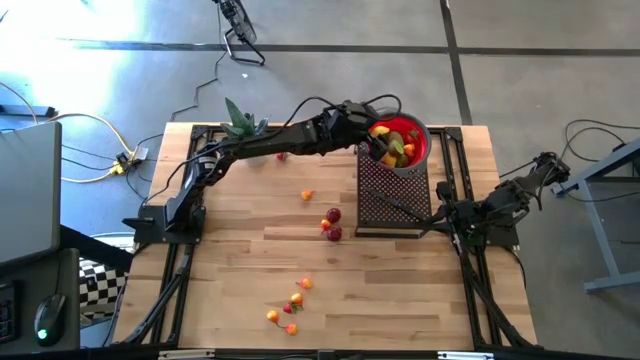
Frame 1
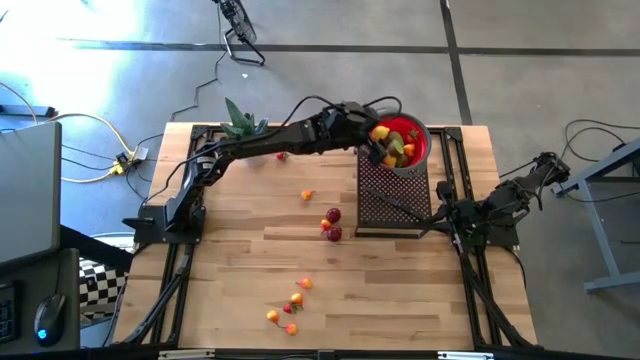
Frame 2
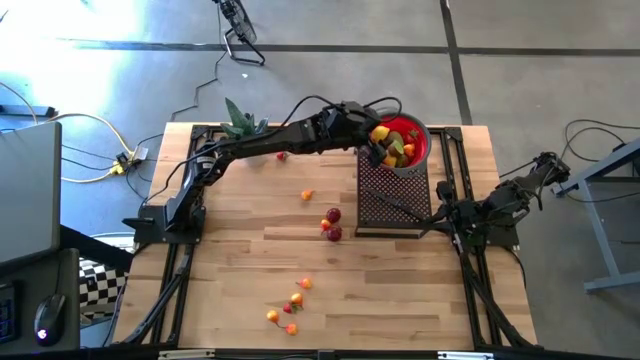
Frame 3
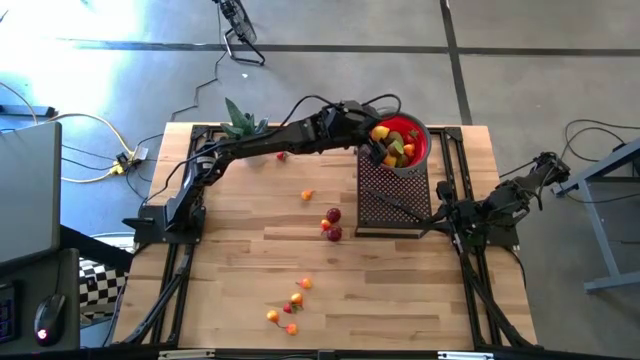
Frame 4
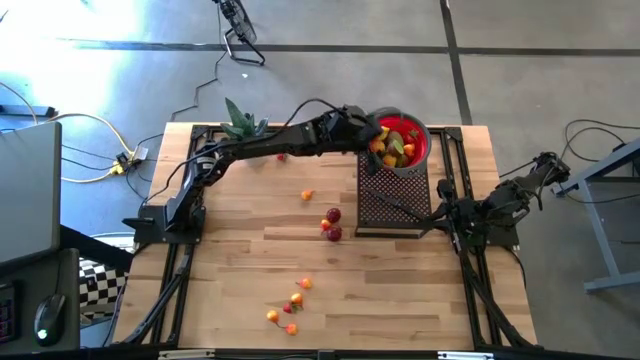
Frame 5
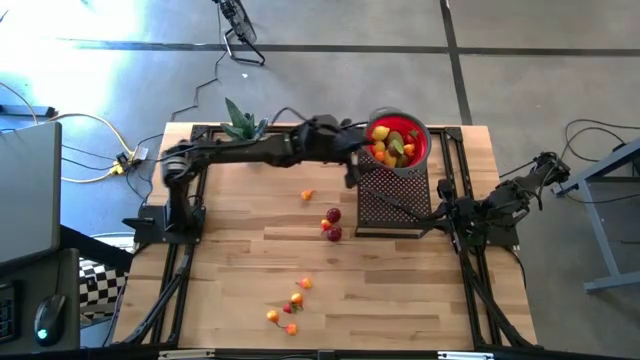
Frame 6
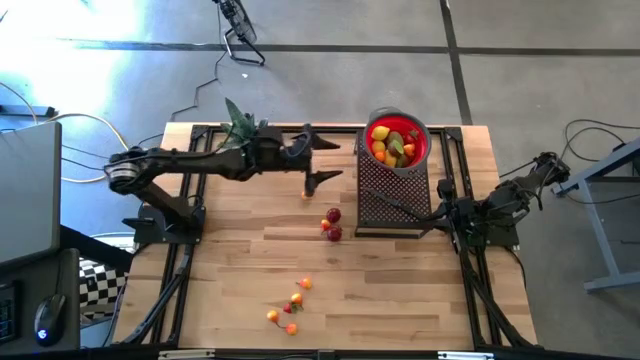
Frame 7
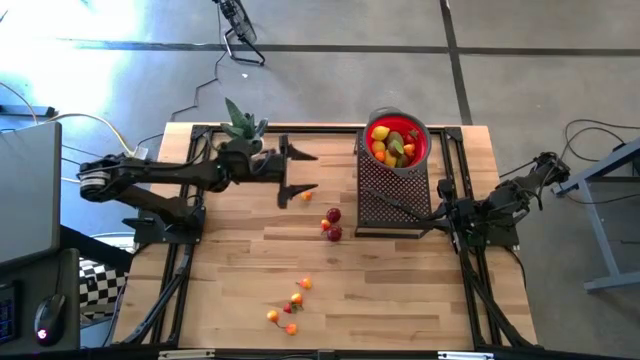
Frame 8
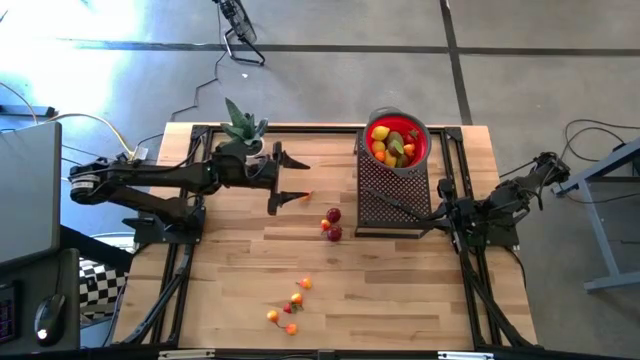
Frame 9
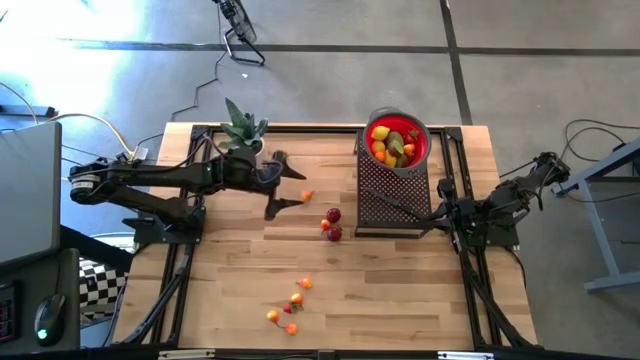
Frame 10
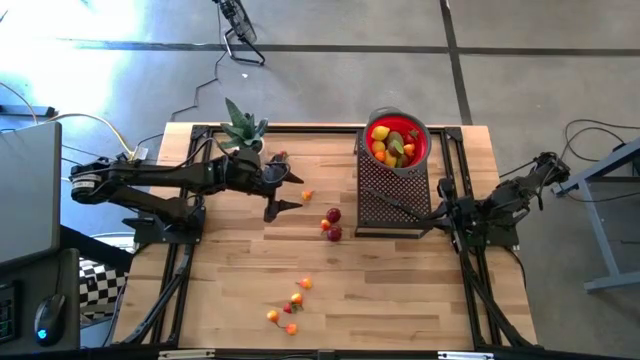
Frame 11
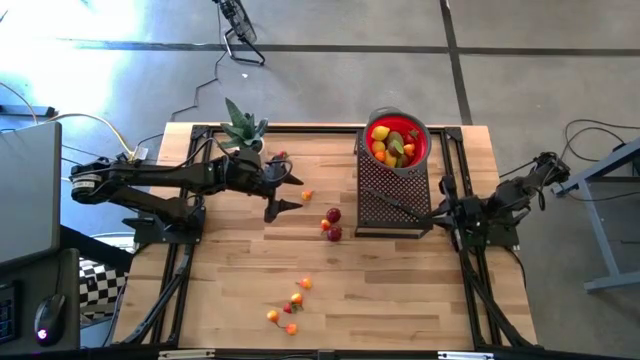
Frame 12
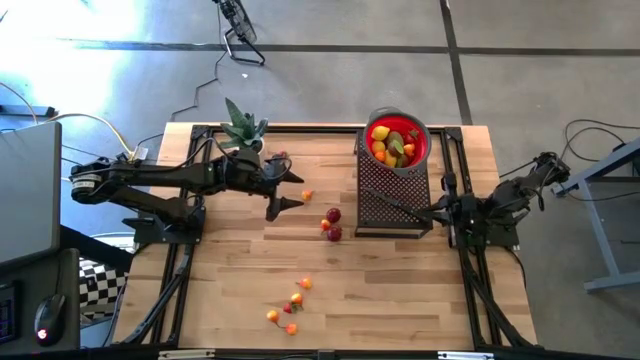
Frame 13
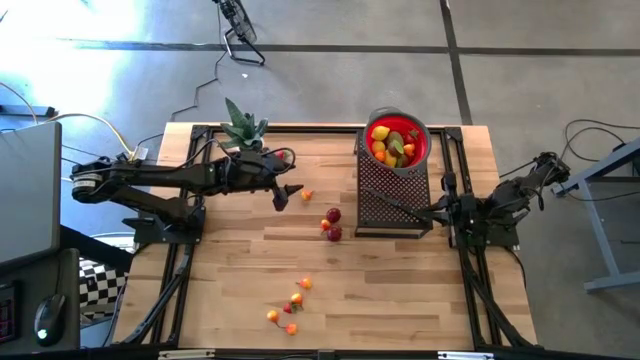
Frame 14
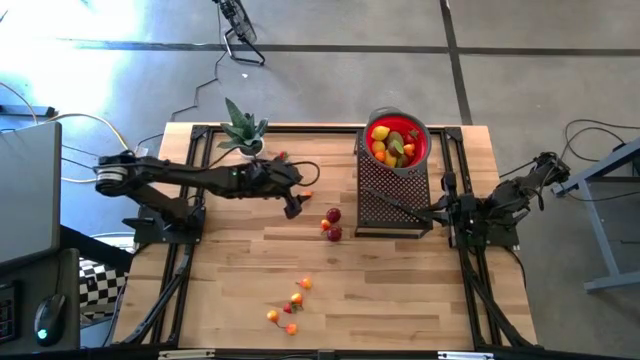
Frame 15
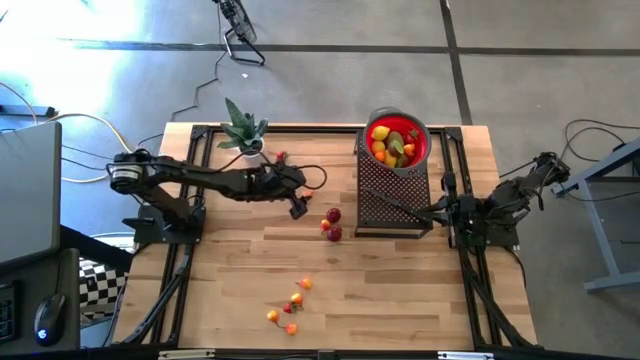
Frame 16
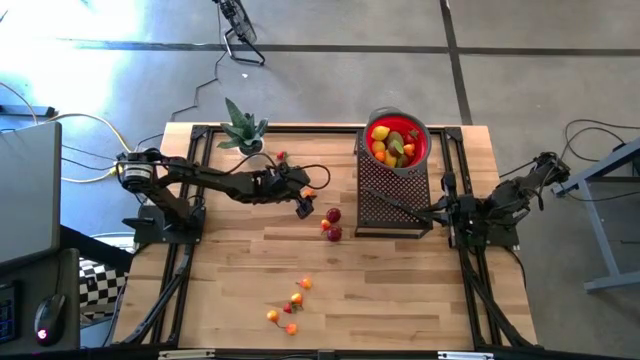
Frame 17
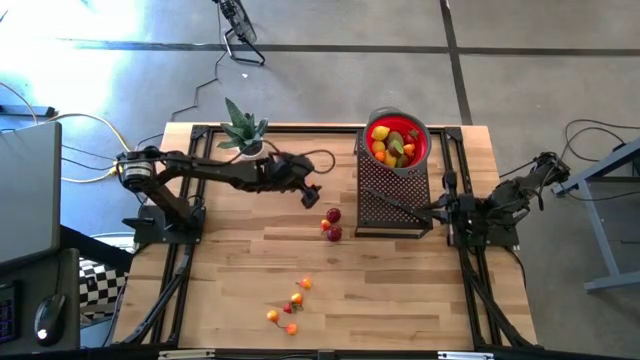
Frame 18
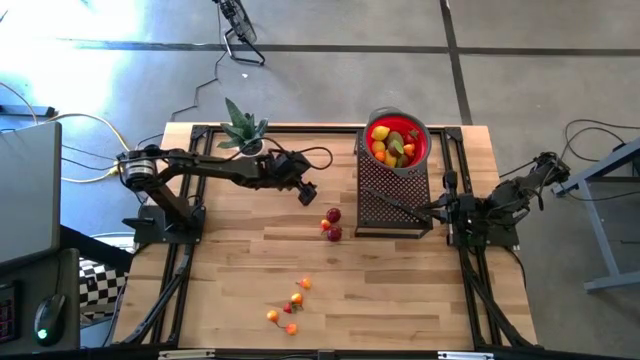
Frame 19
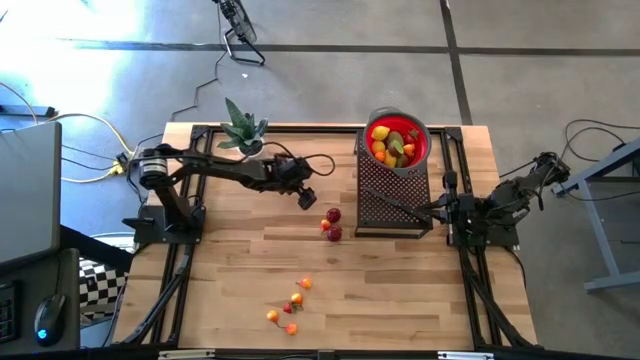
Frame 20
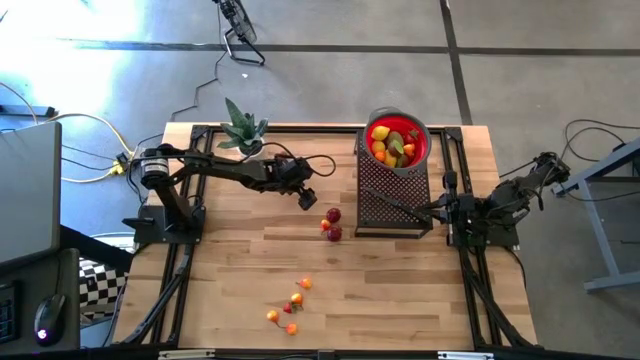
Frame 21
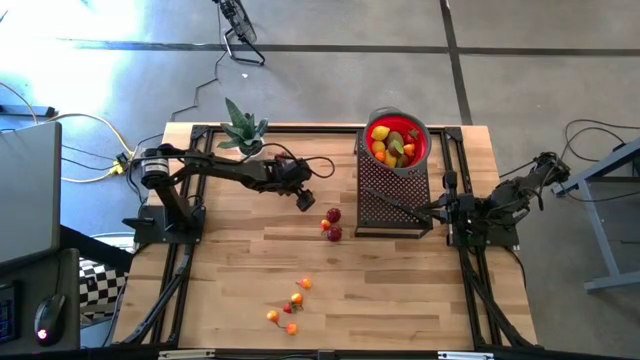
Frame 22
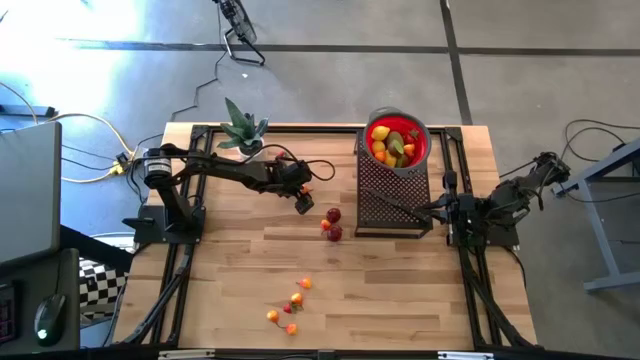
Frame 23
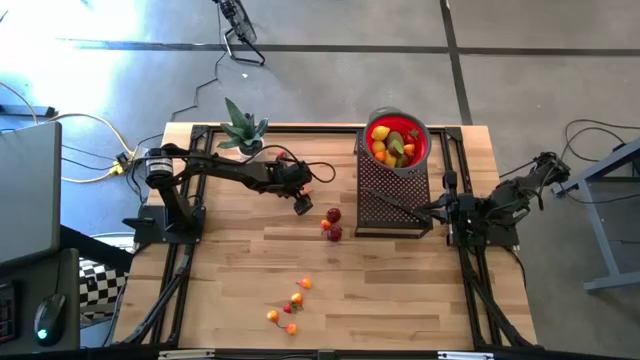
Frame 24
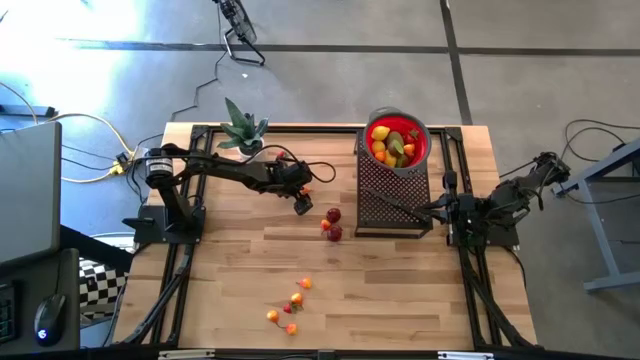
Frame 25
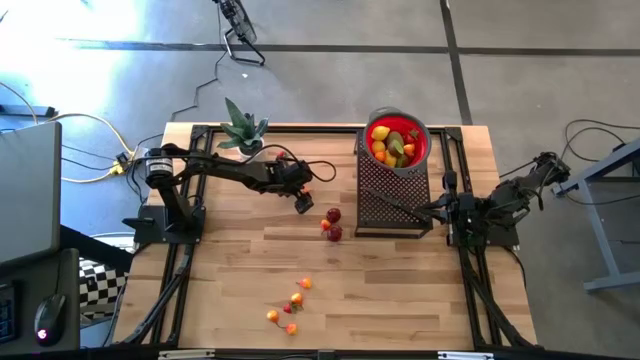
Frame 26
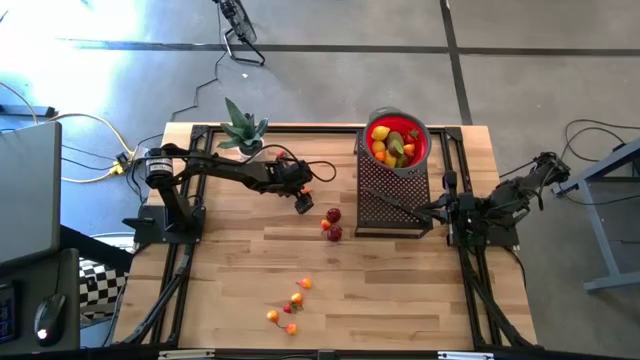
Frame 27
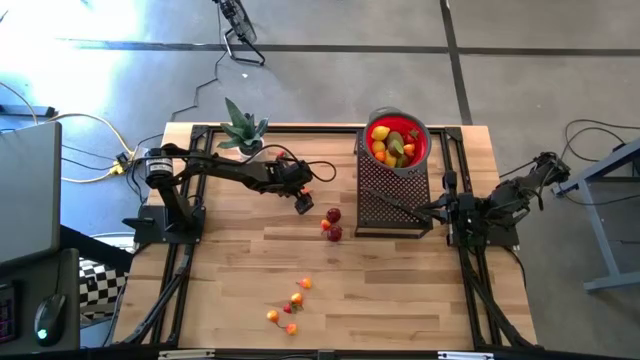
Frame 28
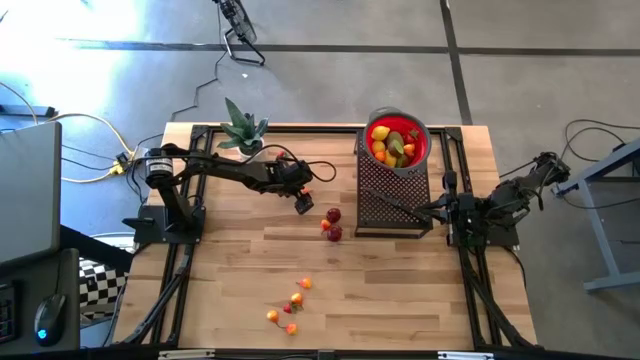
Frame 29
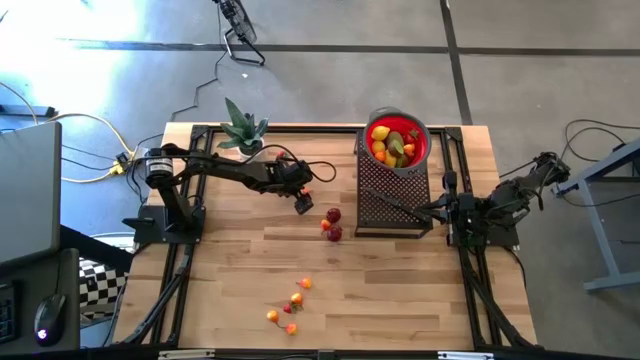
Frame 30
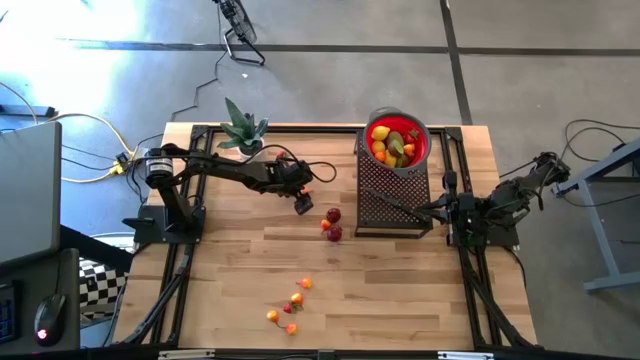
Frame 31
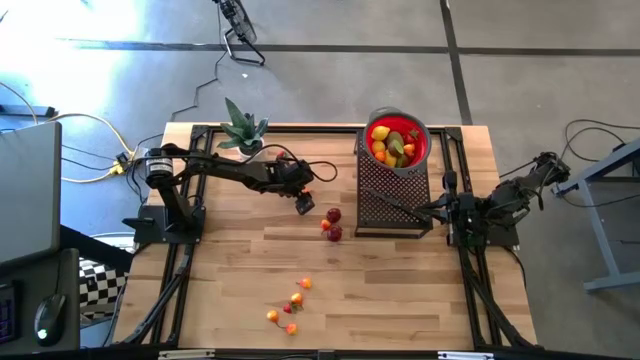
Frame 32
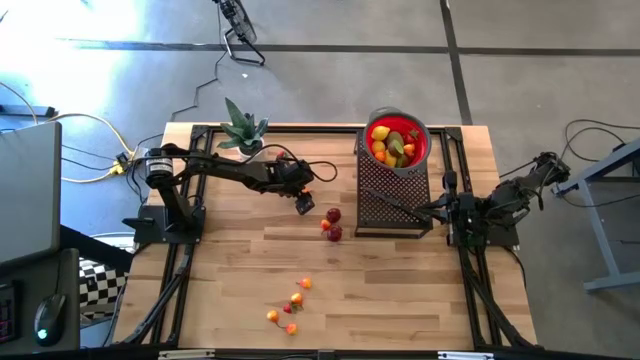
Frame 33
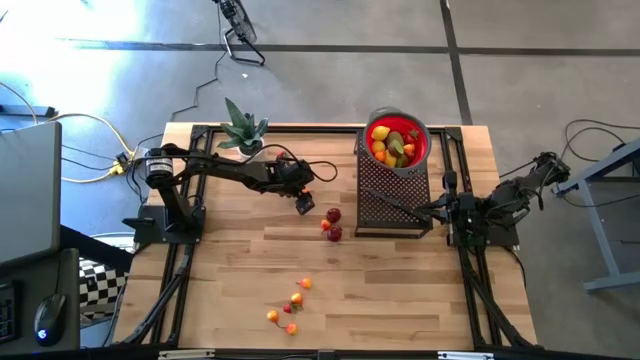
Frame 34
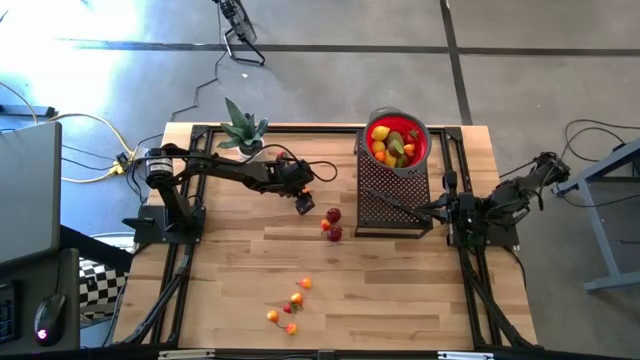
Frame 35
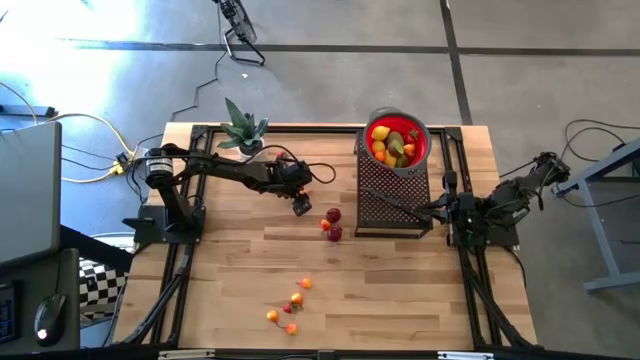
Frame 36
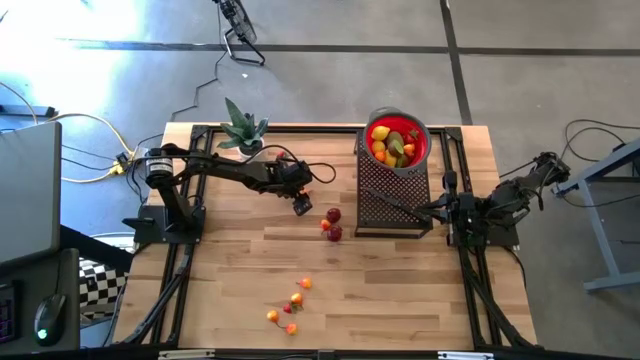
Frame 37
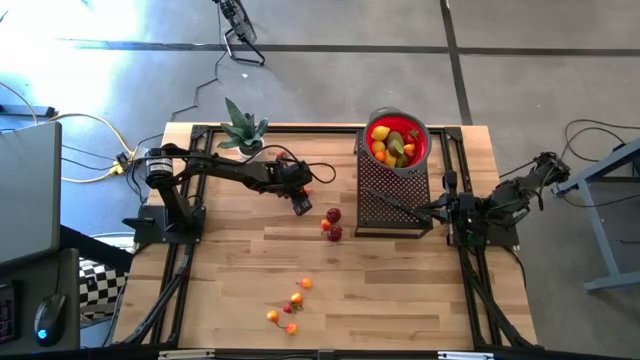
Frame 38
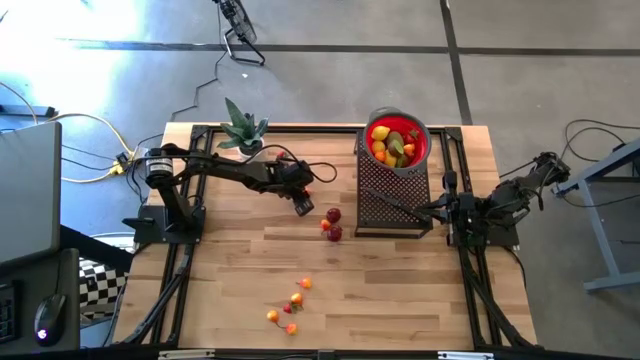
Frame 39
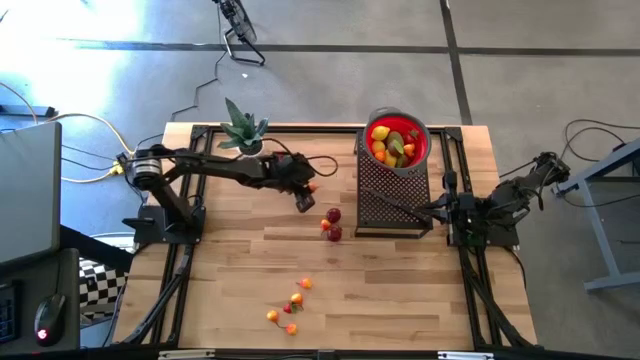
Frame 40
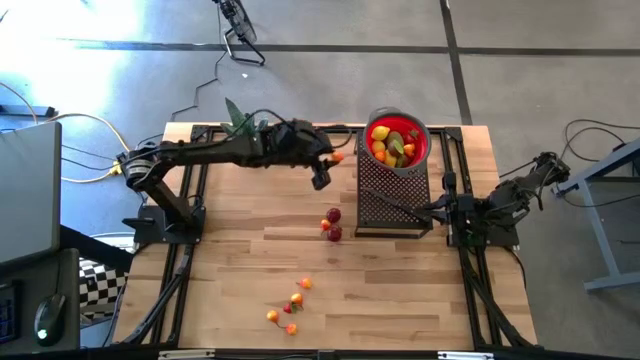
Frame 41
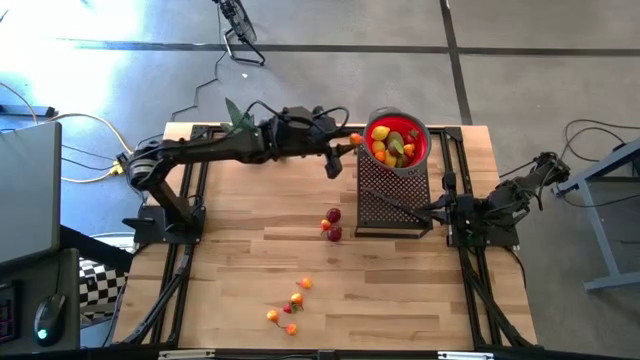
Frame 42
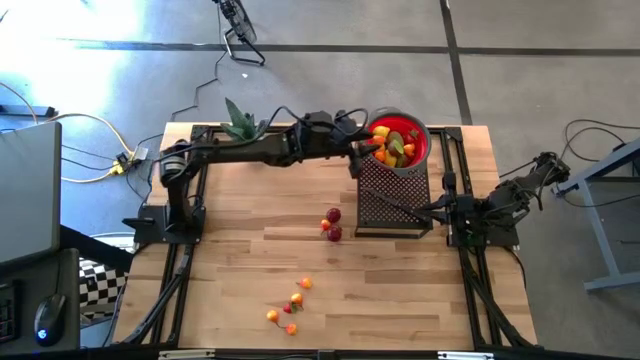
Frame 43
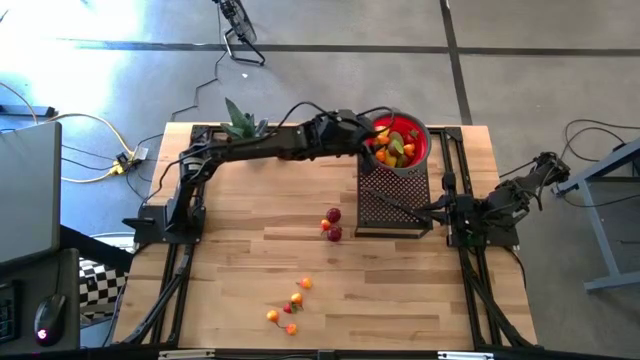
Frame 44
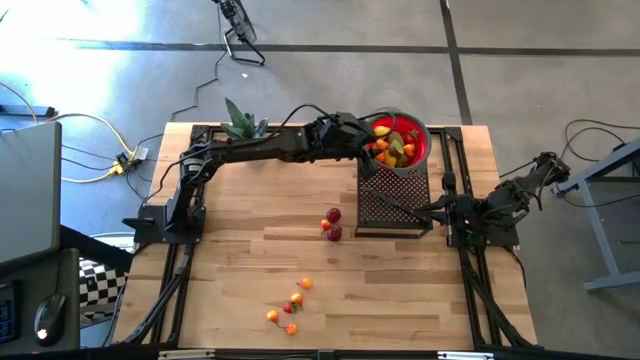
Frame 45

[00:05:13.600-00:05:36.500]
Task: Pick & Place Fruit
Put the pear into the strainer bowl on the shelf
